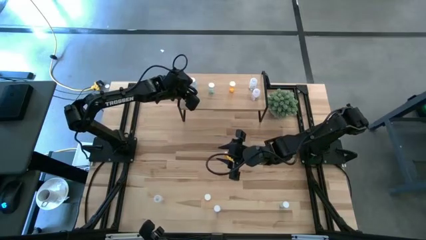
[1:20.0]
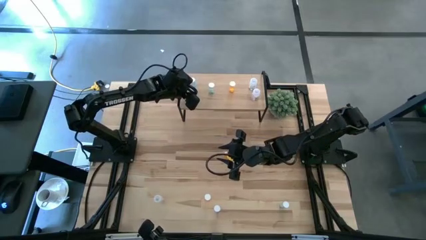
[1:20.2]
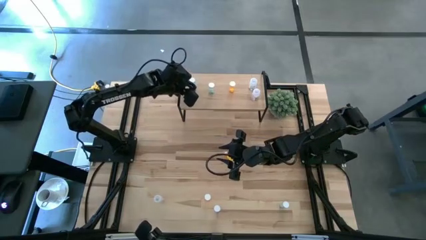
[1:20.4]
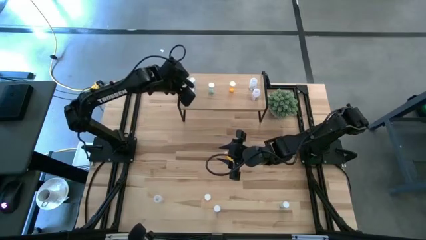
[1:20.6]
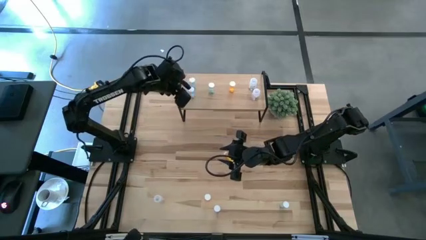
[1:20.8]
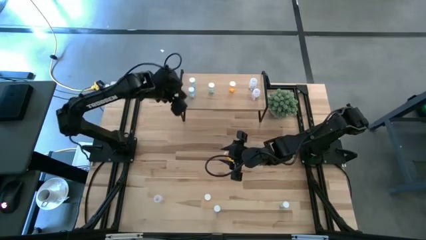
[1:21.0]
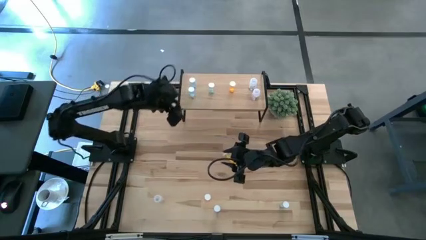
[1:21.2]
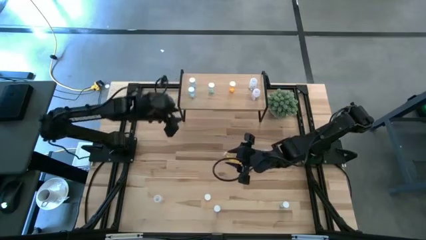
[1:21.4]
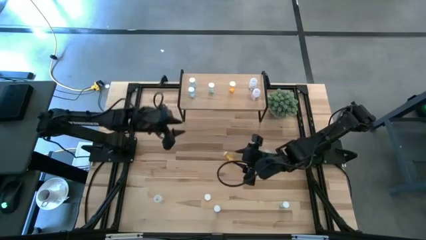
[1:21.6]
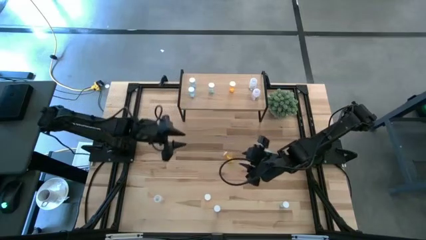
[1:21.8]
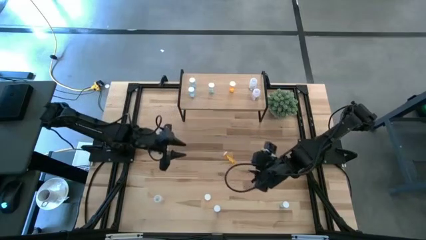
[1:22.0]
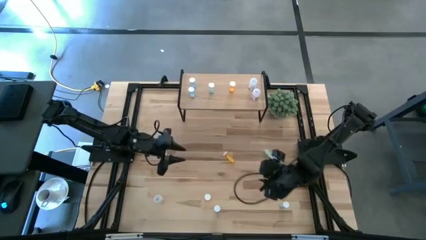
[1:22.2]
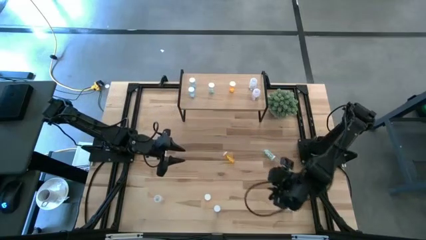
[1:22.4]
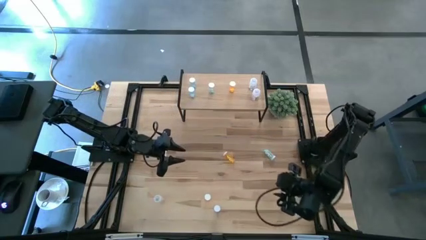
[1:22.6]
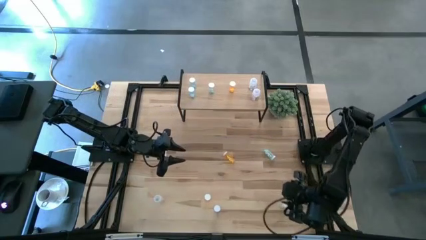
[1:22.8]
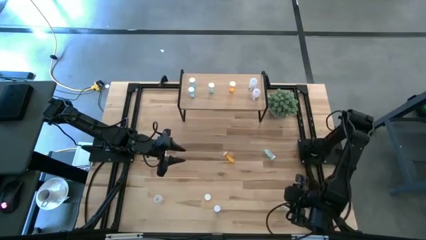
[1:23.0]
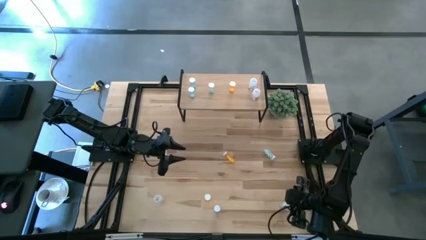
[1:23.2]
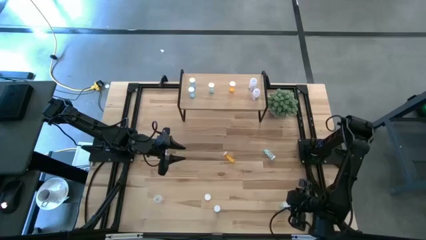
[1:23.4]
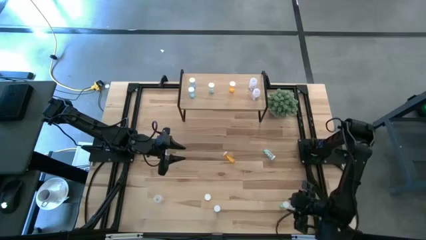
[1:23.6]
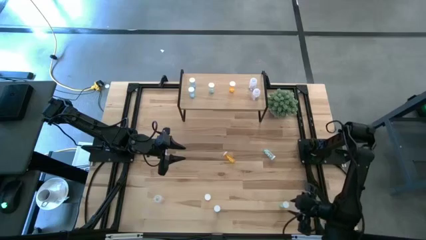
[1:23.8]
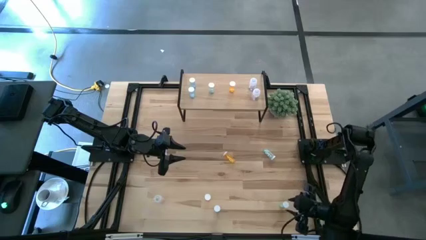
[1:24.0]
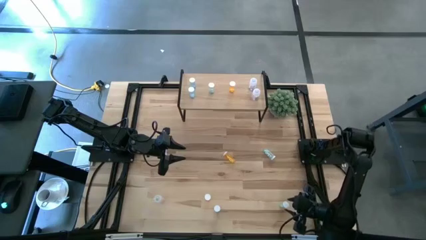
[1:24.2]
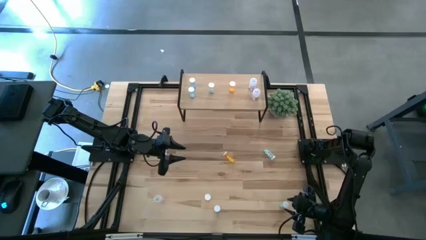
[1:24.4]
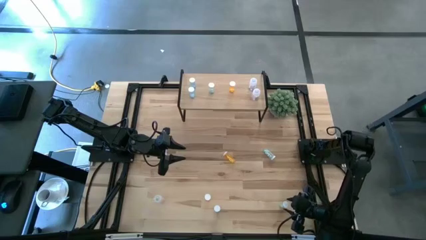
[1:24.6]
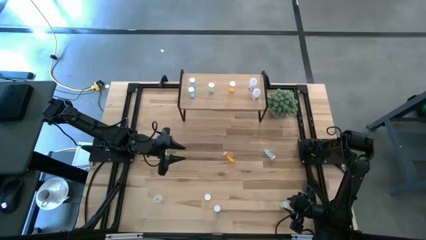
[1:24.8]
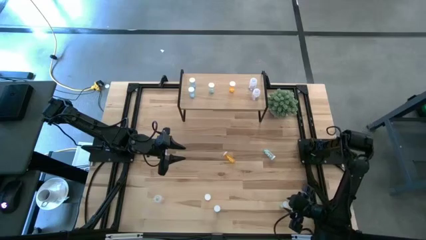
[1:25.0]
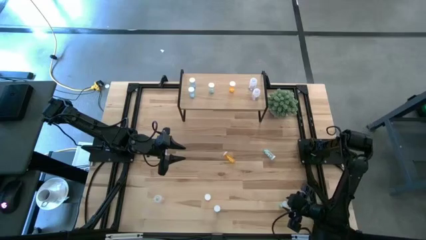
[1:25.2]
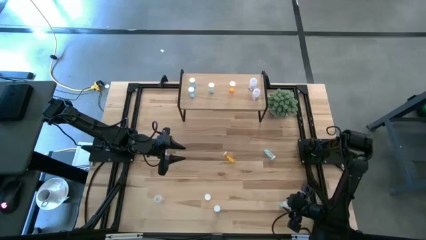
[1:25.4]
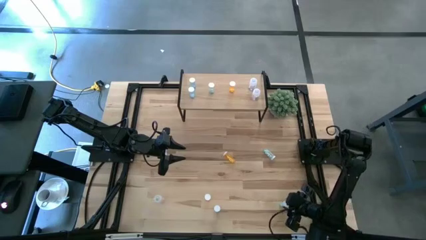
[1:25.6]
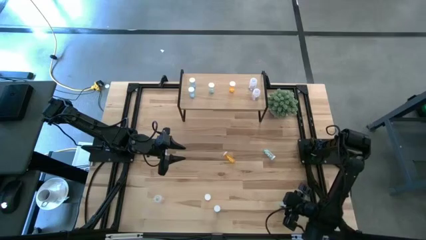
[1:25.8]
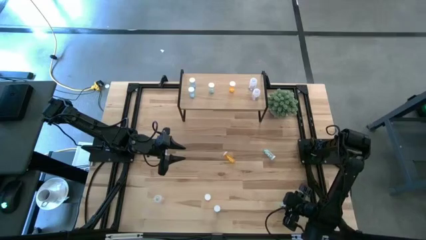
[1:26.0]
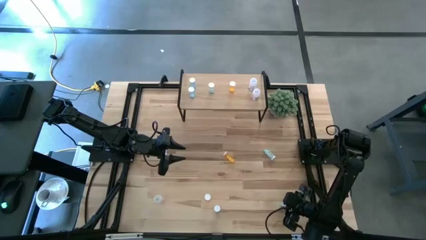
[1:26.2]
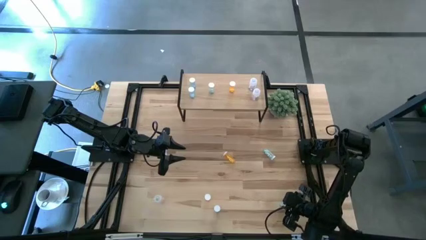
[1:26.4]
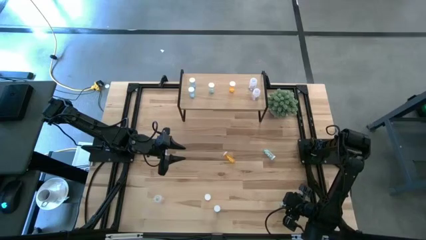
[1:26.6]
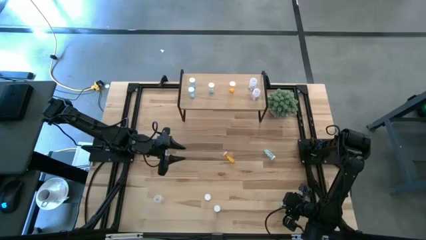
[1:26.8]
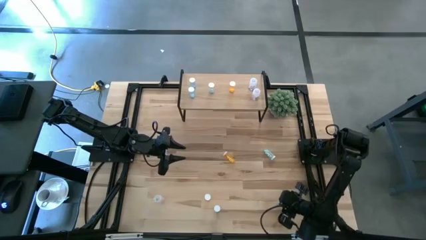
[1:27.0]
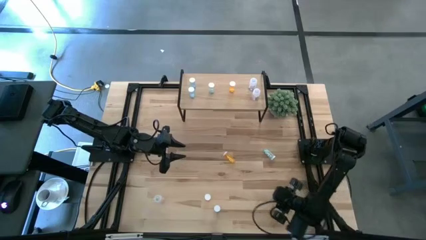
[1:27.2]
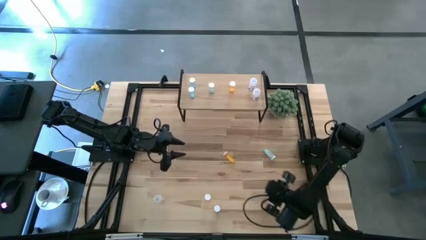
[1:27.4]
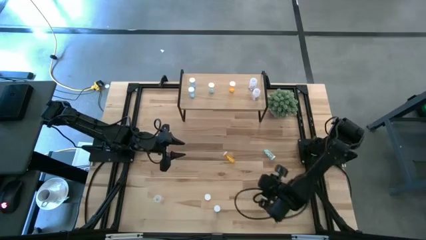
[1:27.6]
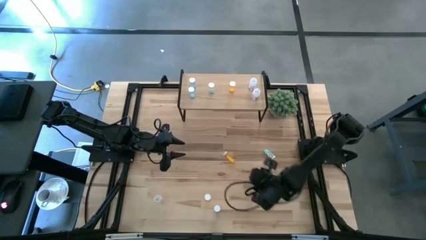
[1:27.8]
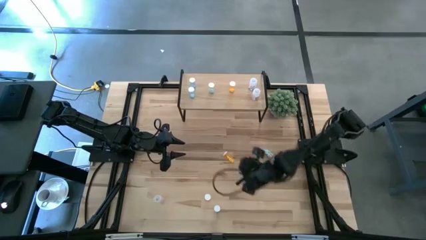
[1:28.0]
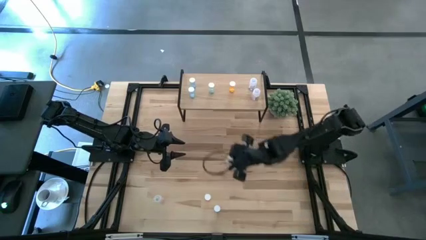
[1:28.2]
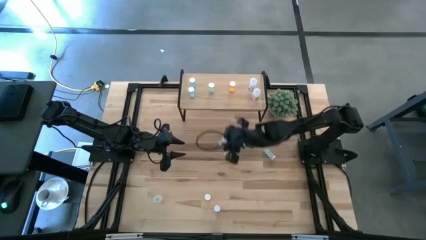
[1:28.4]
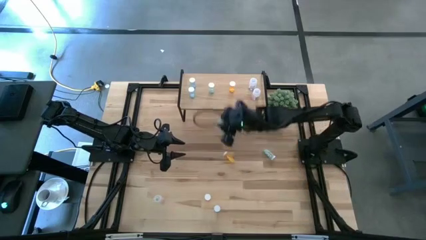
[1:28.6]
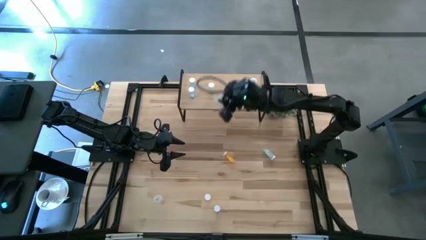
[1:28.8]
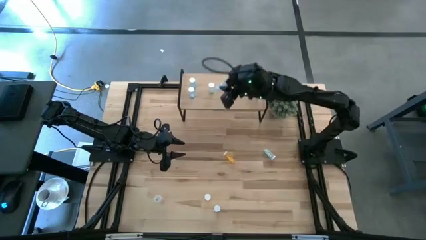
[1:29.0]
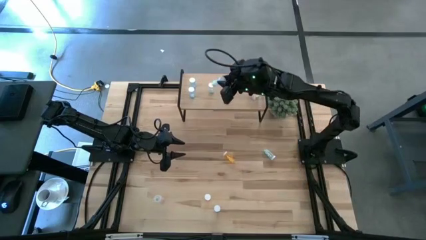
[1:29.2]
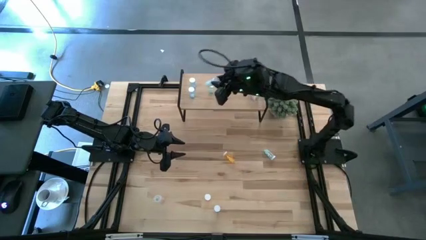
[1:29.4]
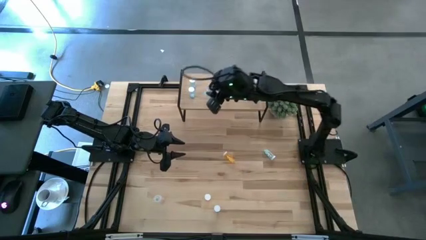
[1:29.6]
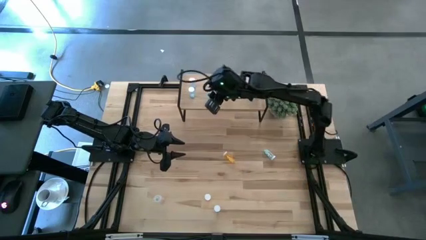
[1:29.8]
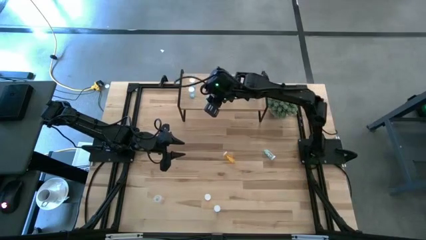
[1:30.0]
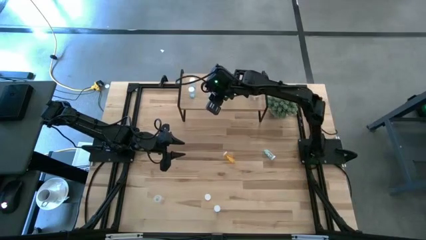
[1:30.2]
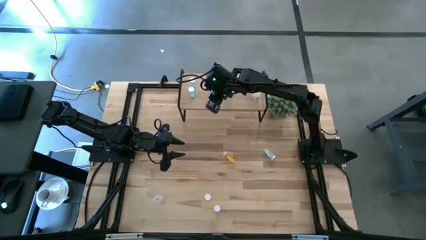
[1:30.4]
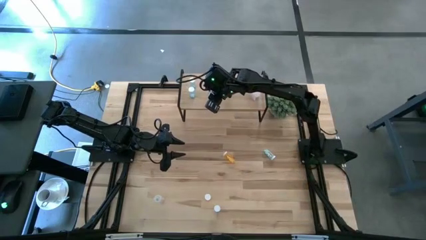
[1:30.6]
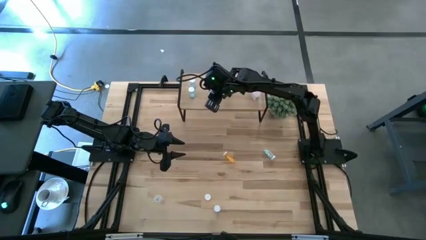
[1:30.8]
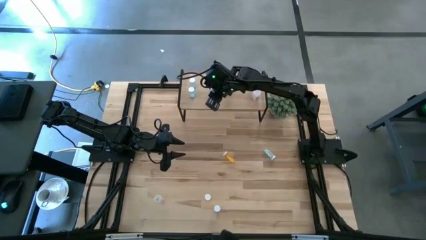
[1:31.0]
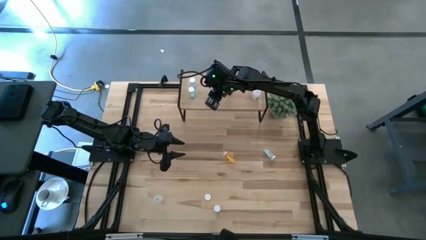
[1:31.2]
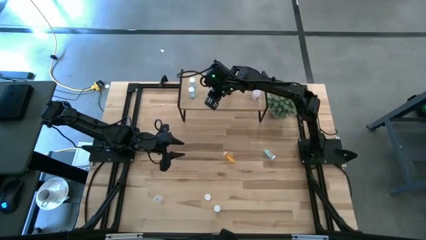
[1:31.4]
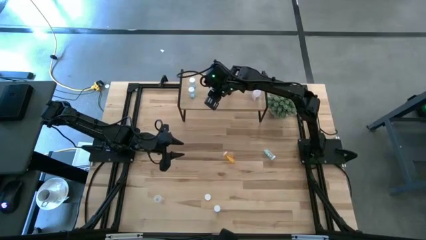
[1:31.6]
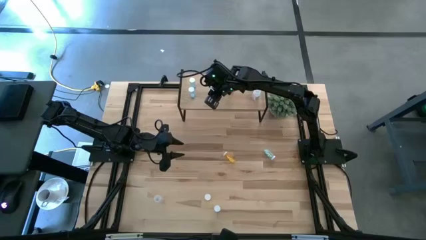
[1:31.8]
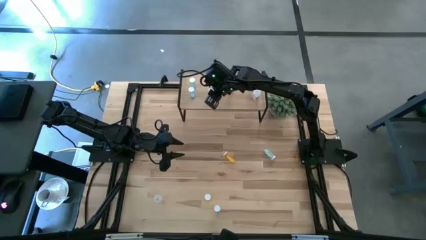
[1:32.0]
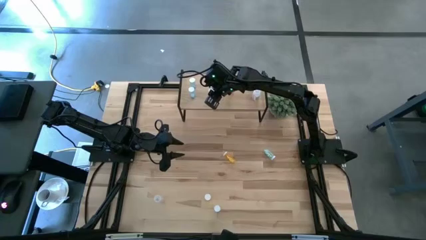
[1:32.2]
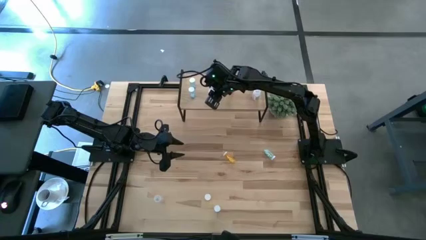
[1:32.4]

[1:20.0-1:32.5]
Task: Pick and place medicine bottles onto shelf by color
Put the bottom light blue pill bottle on the shelf aligned with the other light blue pill bottle

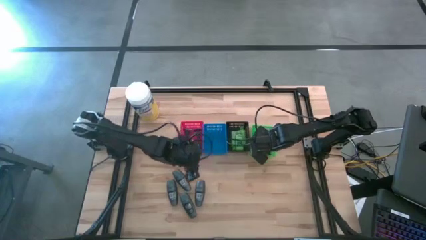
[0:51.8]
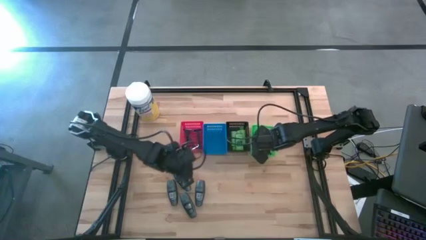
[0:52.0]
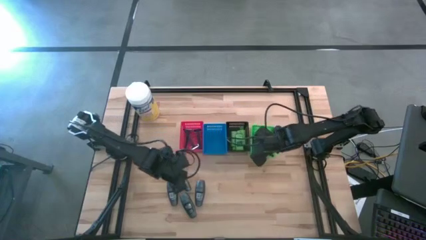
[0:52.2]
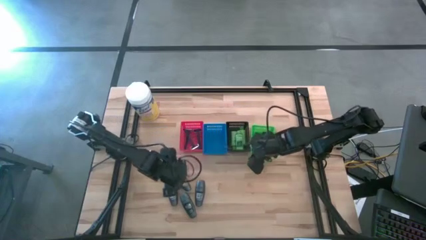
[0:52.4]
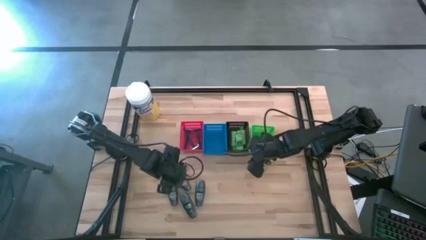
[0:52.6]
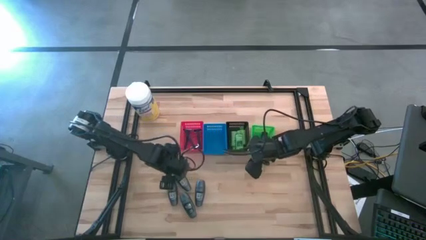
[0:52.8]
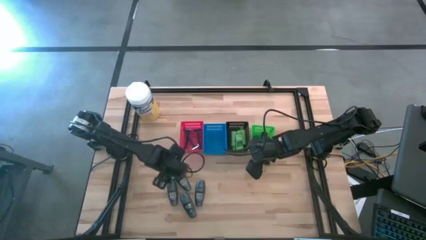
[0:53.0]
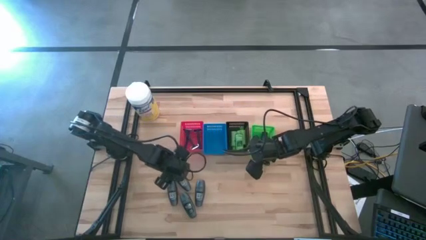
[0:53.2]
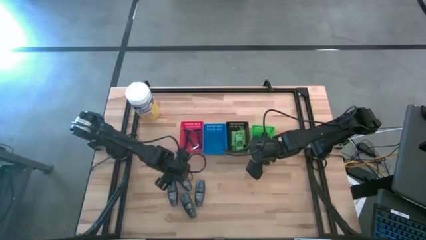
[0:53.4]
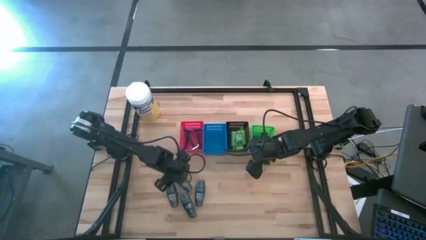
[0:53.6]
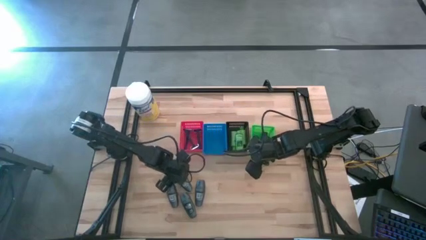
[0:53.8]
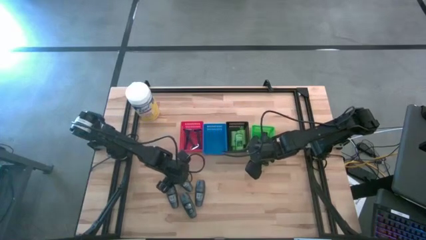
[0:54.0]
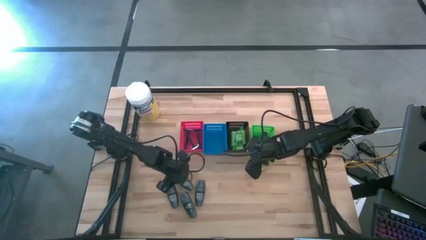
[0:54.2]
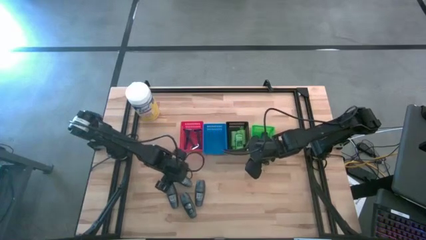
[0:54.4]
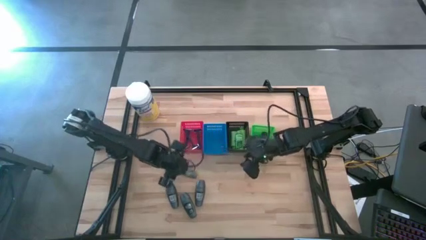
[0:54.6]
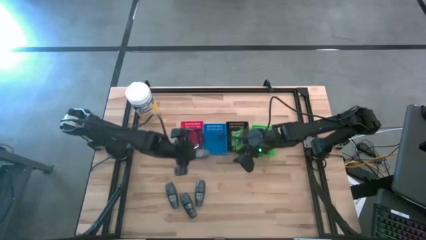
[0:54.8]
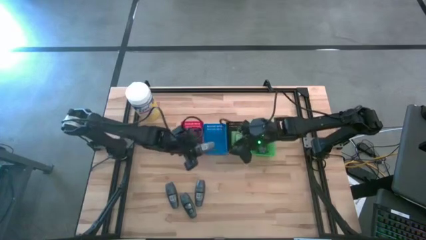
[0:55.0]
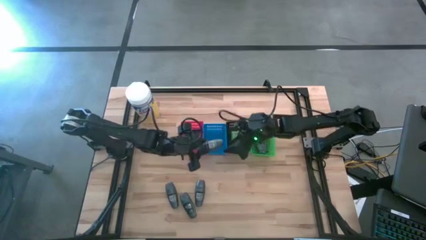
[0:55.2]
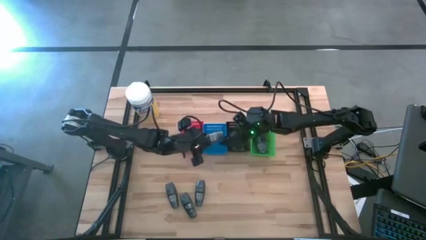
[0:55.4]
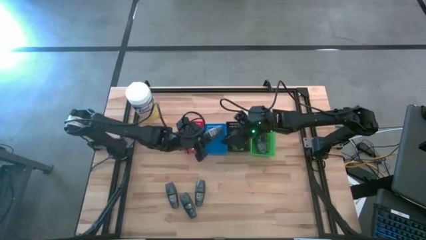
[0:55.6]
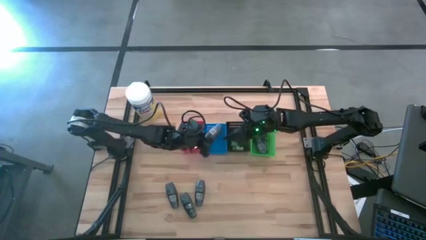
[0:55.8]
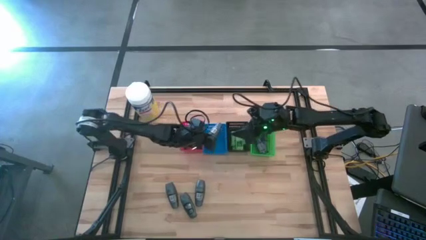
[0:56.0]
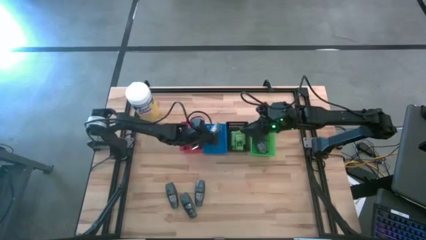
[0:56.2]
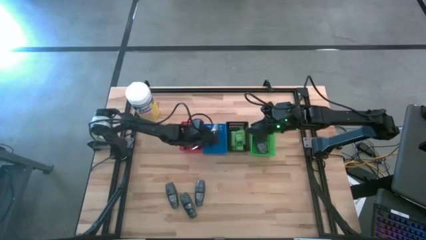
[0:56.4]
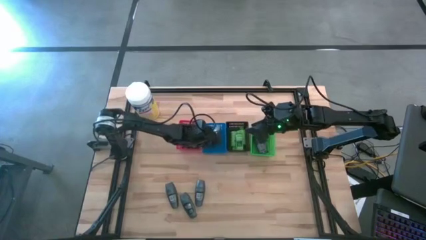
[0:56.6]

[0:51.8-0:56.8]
Task: Pick & Place Travel size toiletries
Put the deodorant into the blue basket
